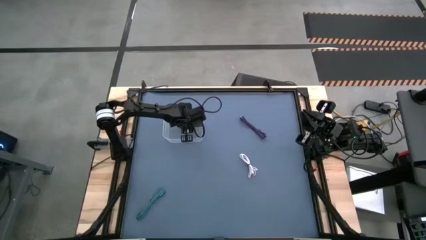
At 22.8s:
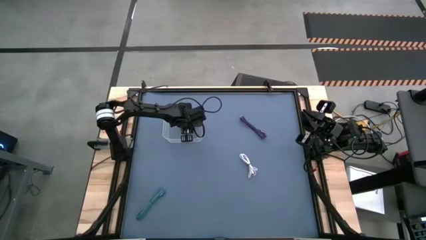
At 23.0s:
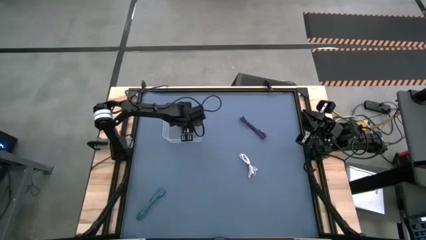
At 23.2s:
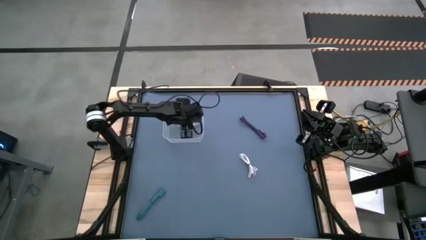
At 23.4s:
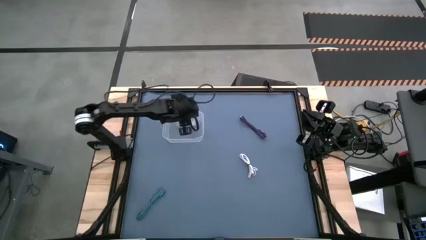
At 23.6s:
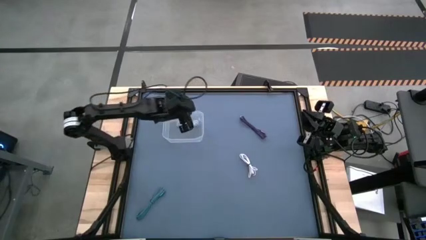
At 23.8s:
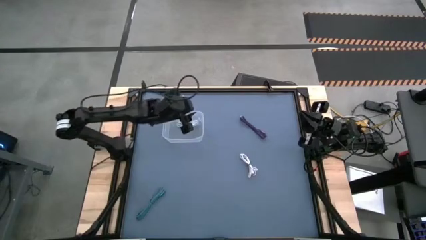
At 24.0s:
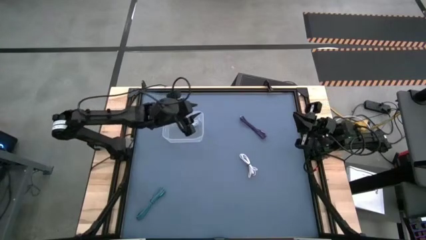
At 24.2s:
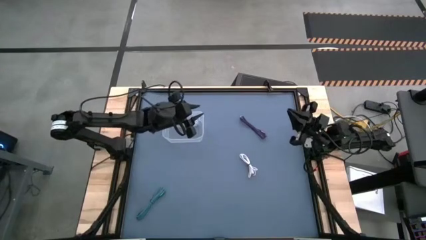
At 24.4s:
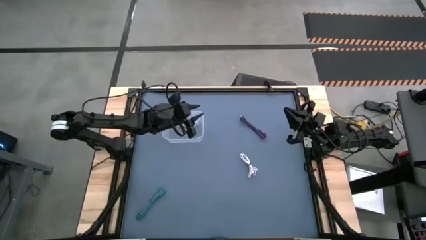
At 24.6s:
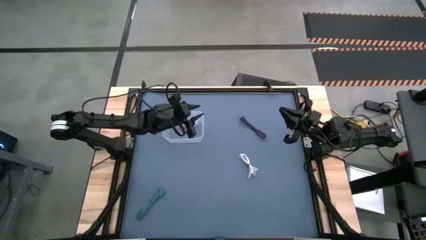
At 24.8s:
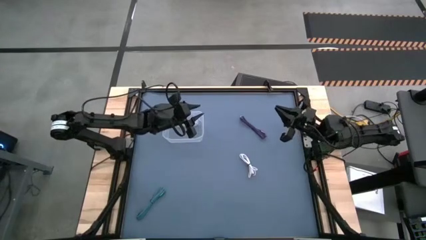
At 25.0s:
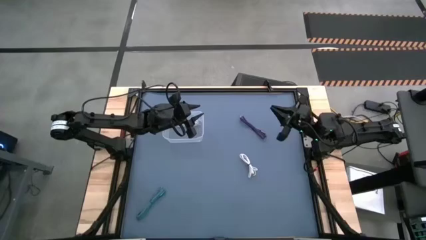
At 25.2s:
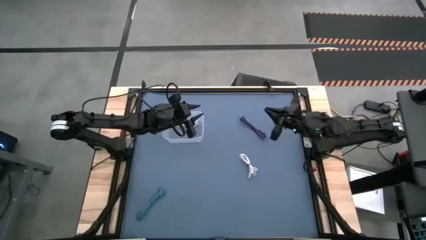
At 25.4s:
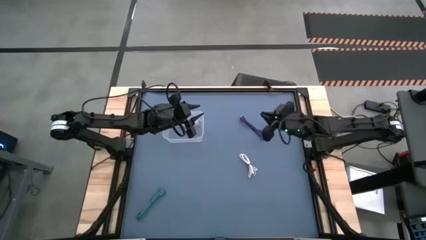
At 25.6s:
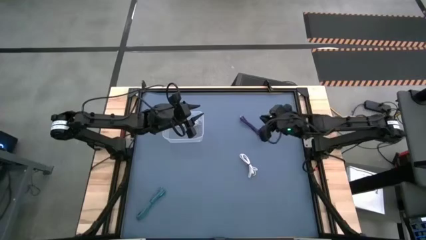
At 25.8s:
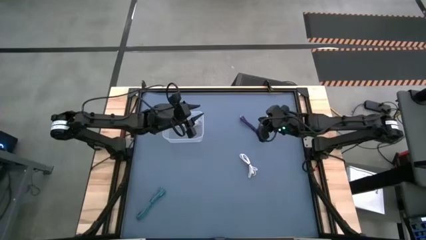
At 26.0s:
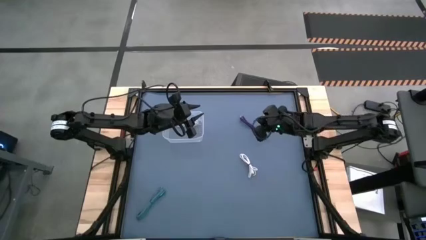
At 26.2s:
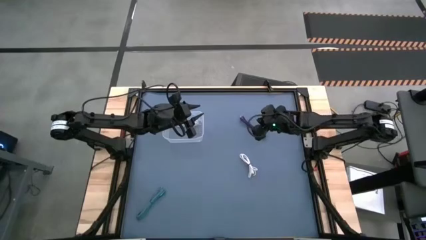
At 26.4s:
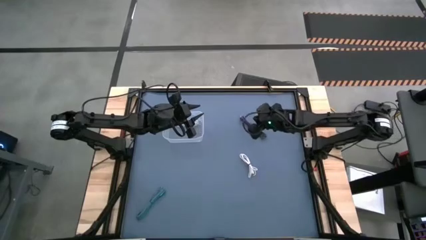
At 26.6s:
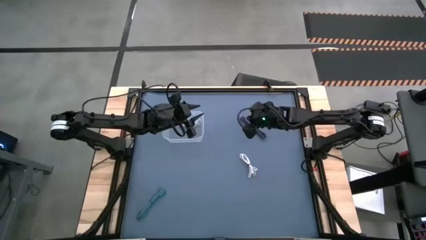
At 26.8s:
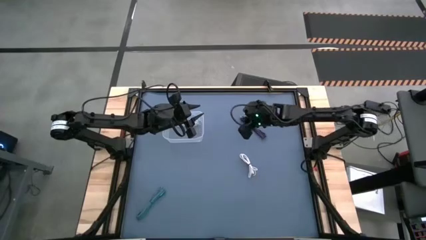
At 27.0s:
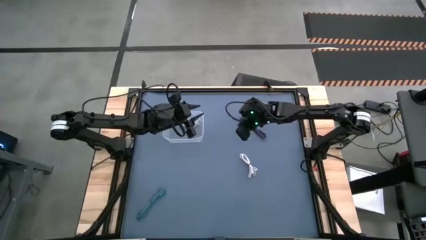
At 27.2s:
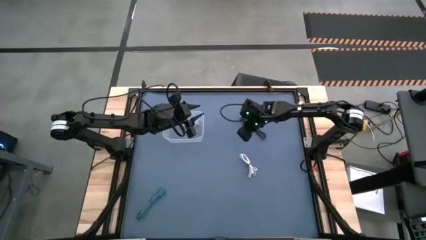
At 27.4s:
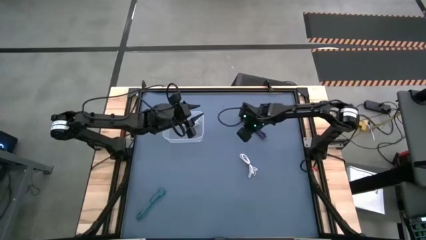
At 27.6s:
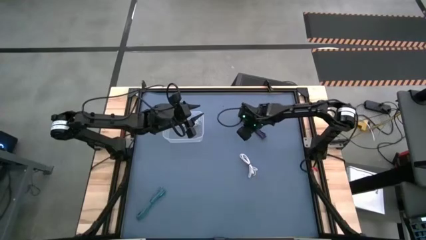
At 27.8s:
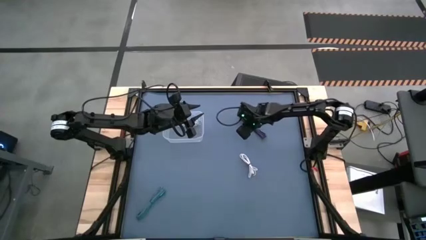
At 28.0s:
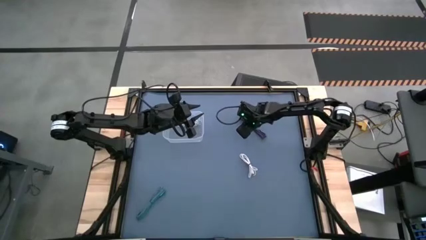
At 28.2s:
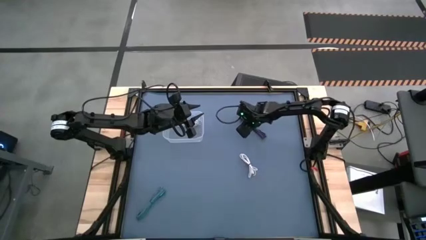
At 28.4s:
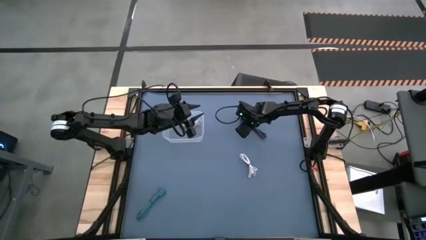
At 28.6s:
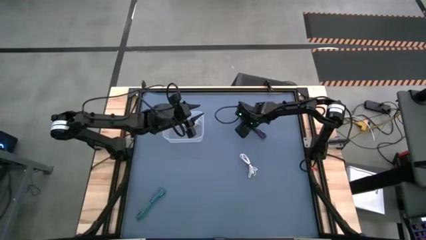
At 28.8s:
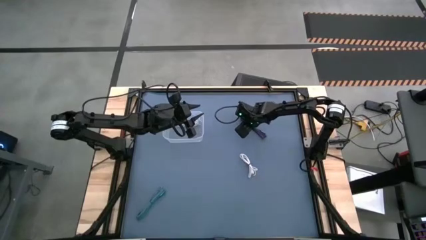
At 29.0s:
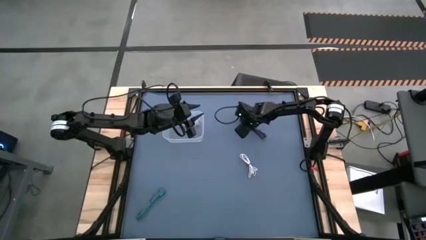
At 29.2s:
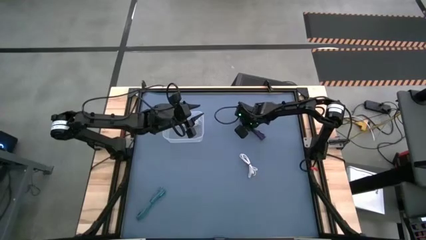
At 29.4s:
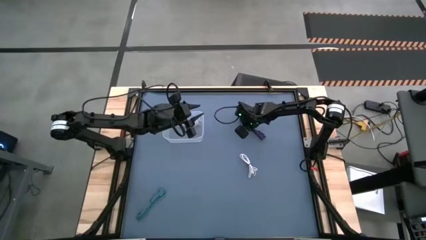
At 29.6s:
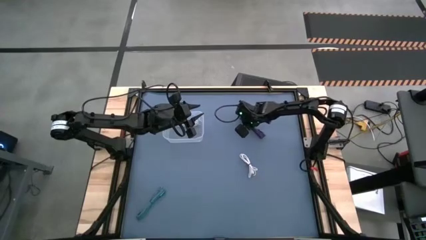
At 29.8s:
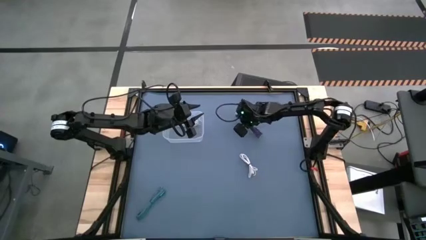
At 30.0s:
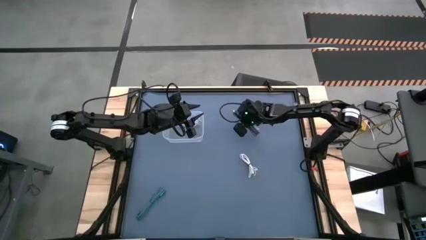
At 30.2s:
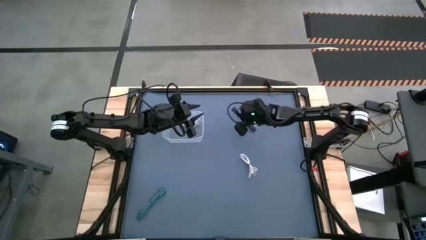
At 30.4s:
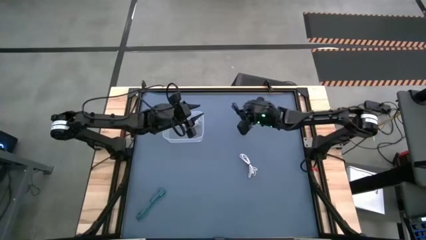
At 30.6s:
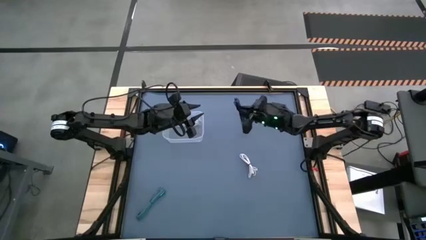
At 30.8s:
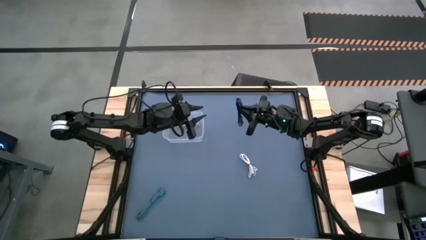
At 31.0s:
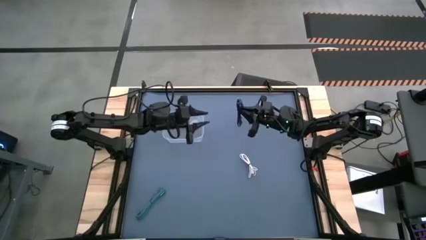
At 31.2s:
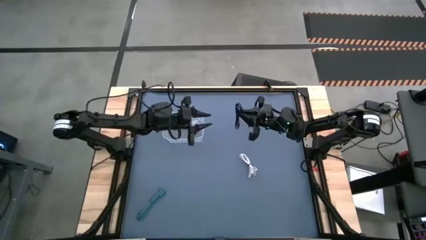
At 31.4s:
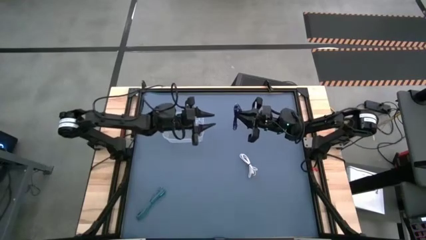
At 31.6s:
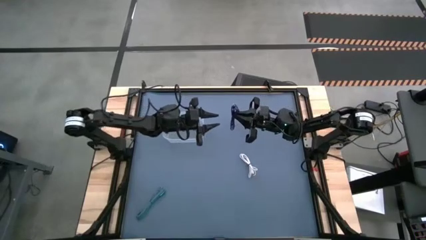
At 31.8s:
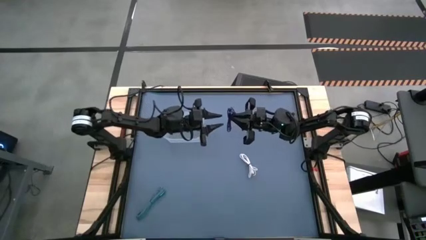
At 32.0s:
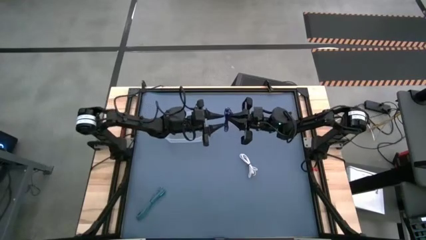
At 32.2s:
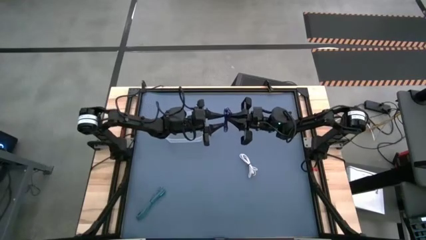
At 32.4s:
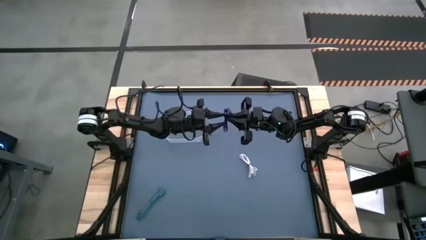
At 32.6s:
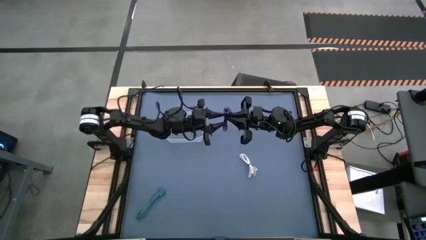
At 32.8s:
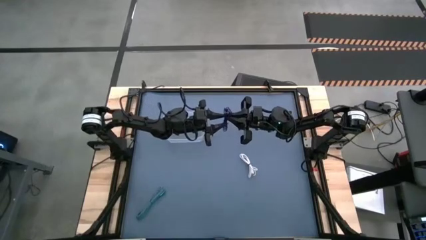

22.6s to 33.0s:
Task: Pick and place USB-C Cables
Put the purple charger cable into the bin

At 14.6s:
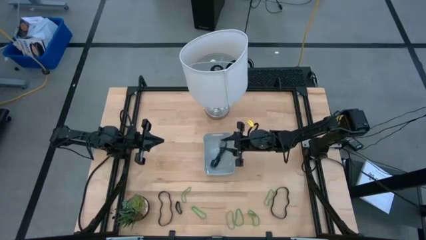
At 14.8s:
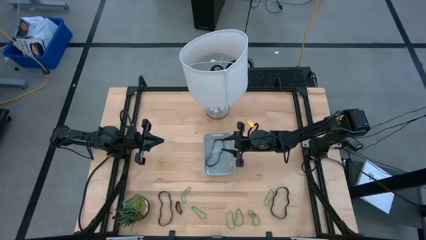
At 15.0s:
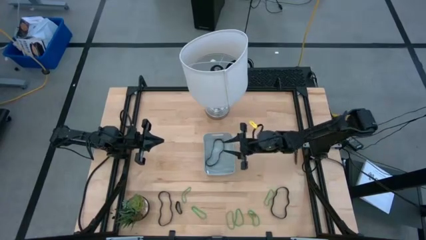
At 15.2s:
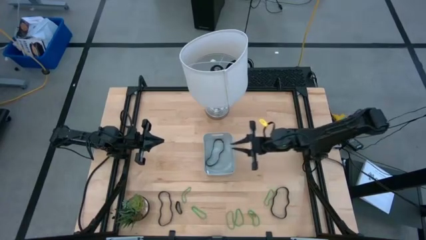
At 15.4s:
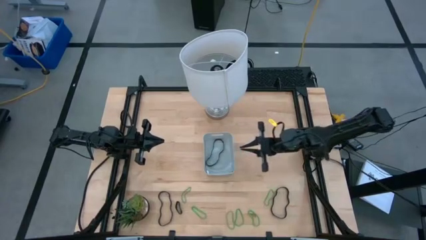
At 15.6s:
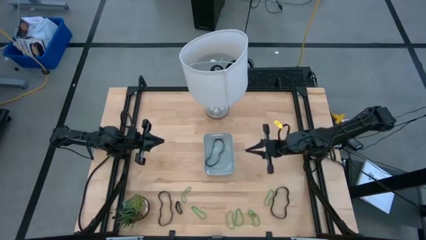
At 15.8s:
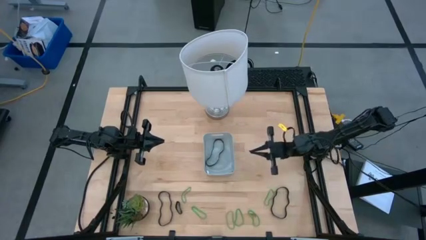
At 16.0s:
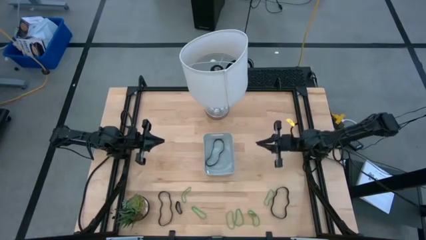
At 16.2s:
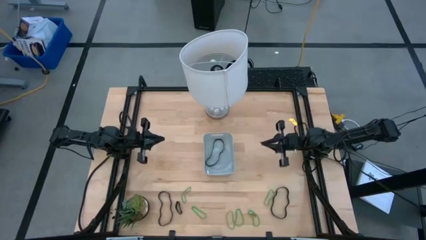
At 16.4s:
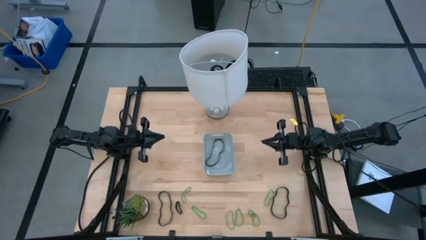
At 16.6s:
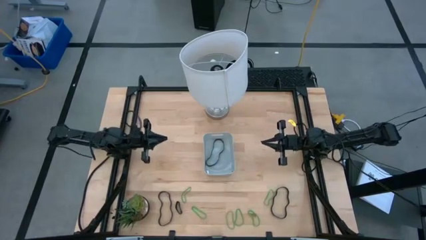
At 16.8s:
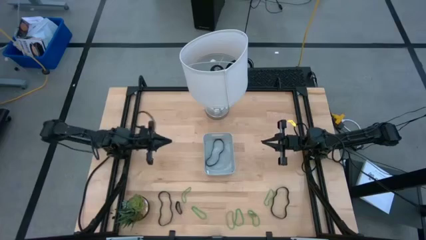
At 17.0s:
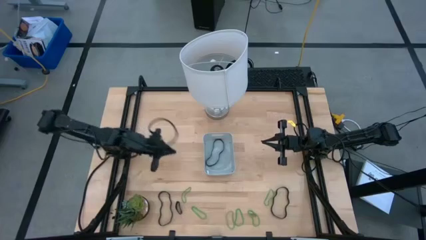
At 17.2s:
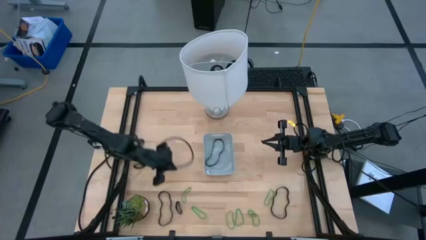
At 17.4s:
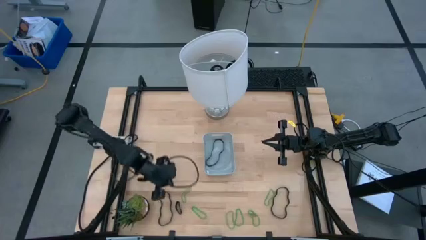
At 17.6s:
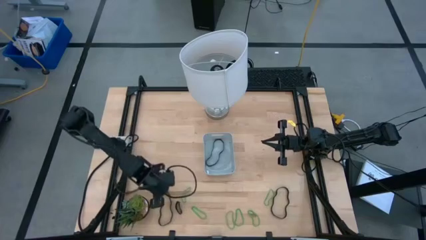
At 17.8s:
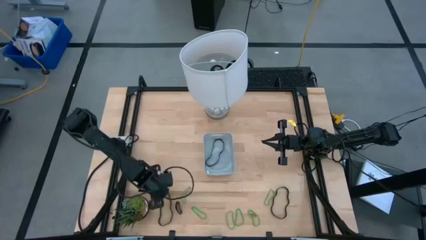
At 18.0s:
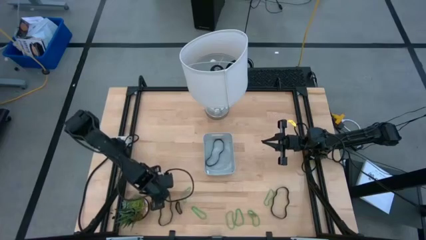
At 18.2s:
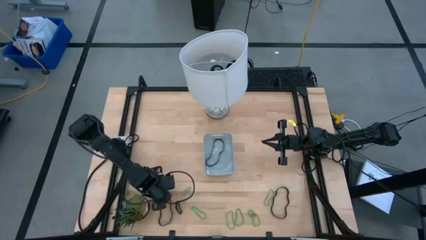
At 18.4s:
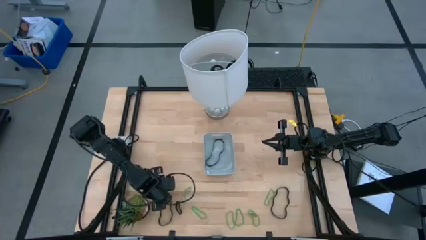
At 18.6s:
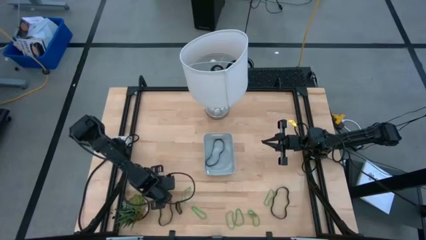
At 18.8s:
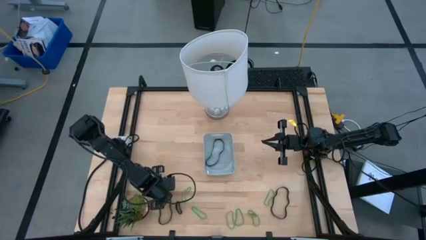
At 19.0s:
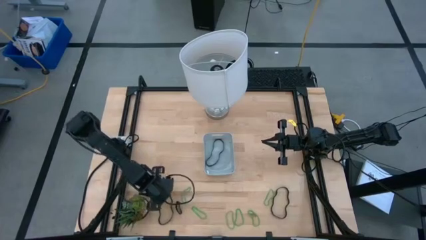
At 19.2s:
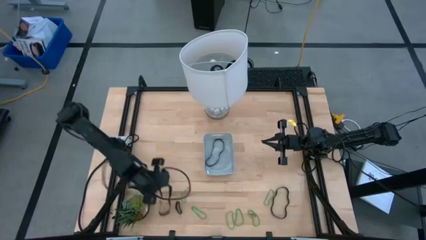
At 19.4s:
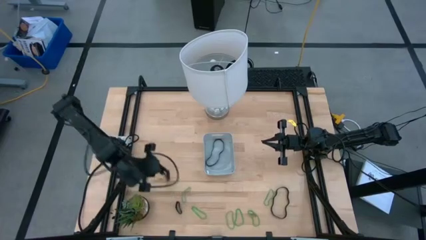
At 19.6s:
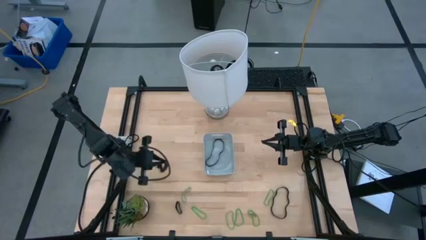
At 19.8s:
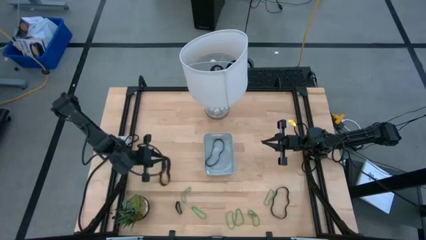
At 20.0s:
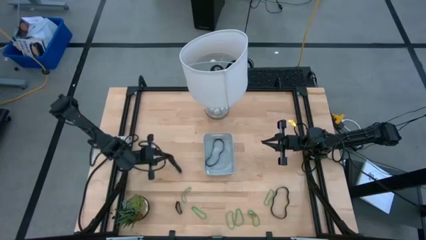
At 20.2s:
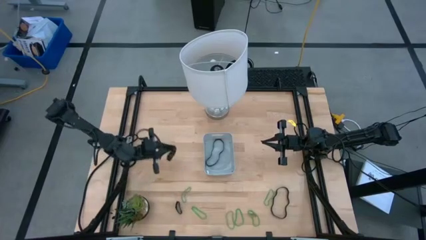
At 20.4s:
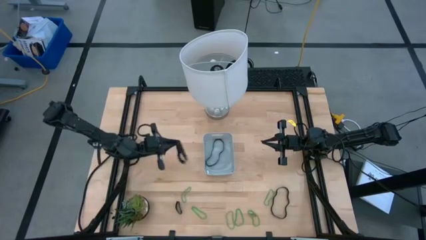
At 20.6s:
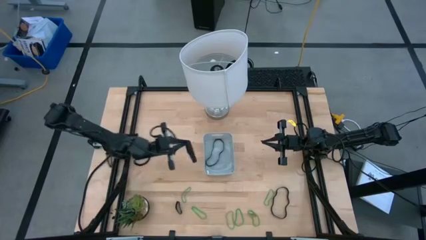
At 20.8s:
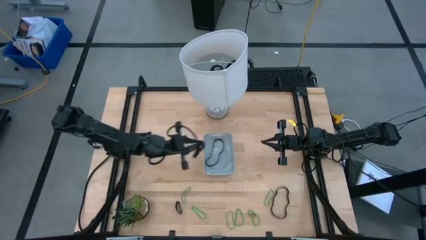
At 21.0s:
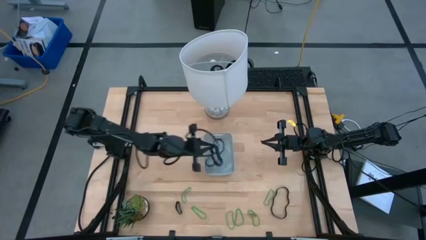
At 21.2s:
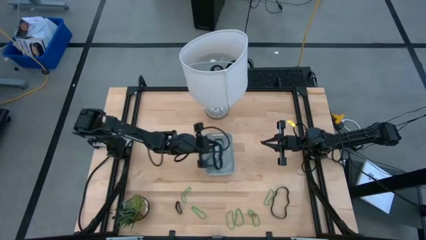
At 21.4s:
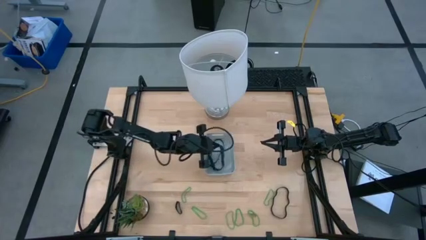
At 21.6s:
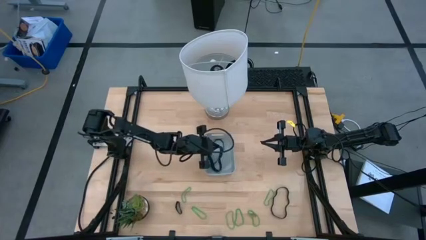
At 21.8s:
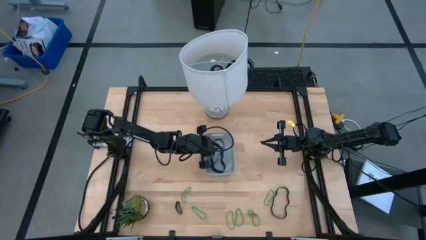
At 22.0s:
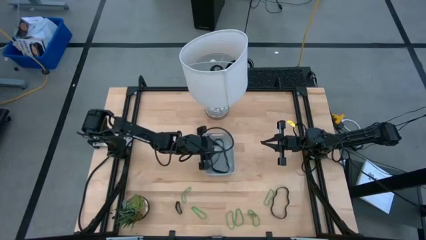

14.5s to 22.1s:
Task: Pick and place rubber bands into bin
Put the black rubber band into the gray bin
